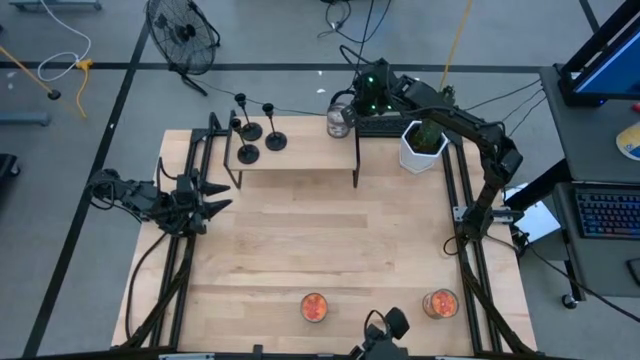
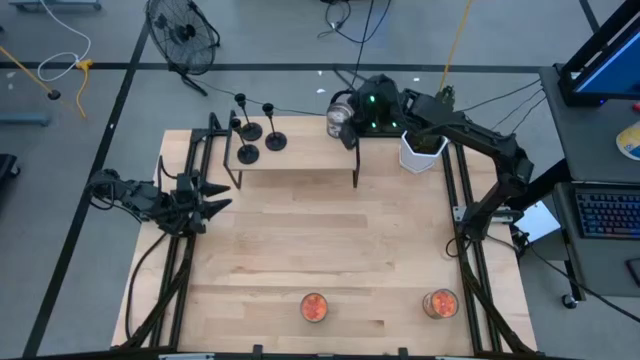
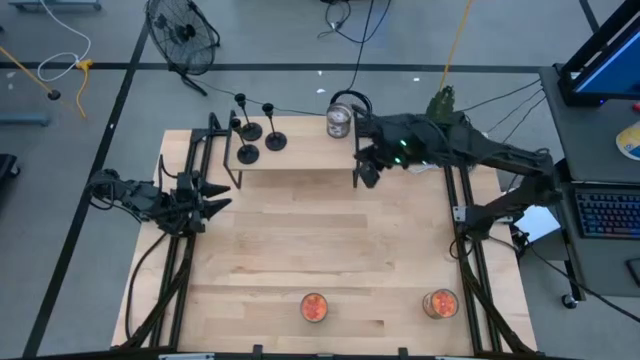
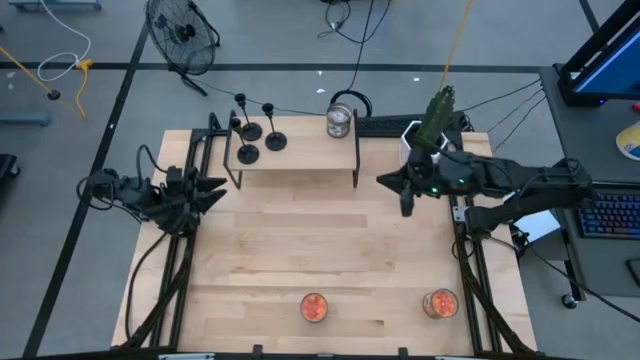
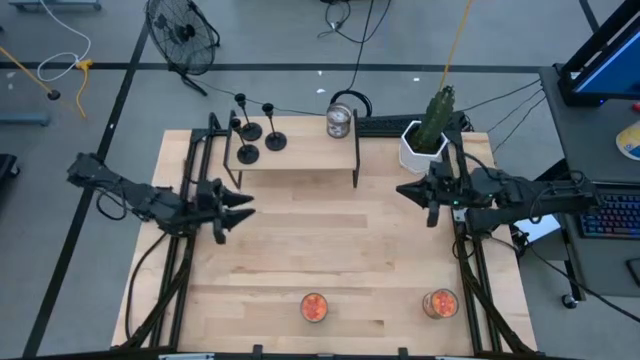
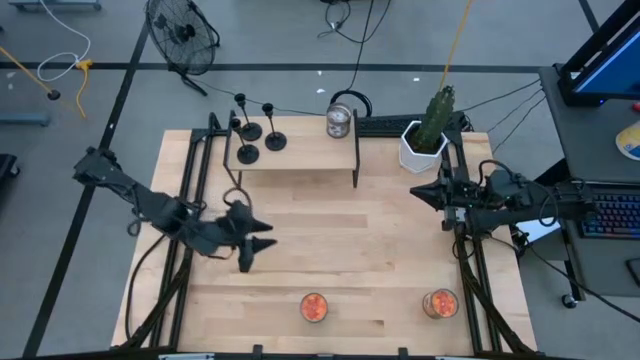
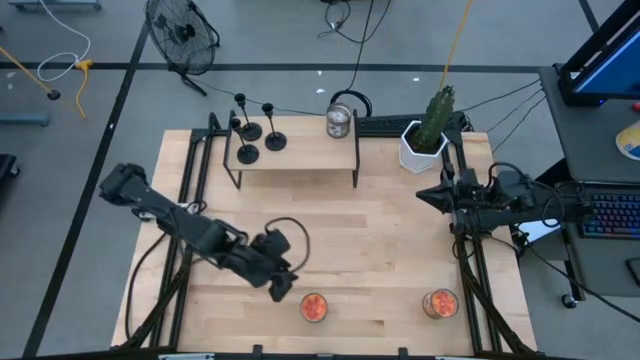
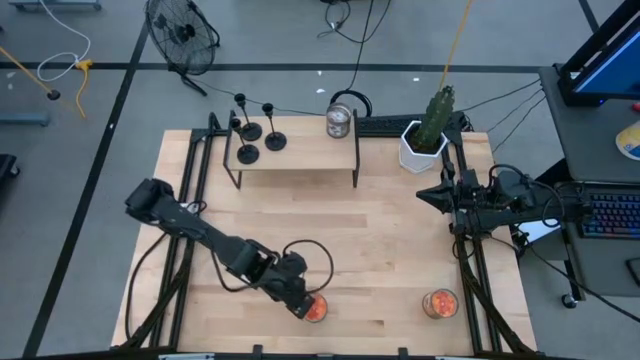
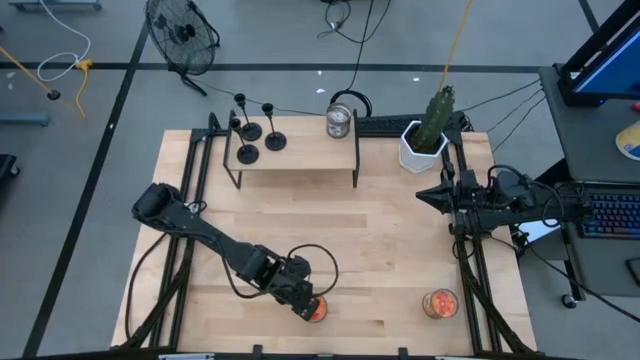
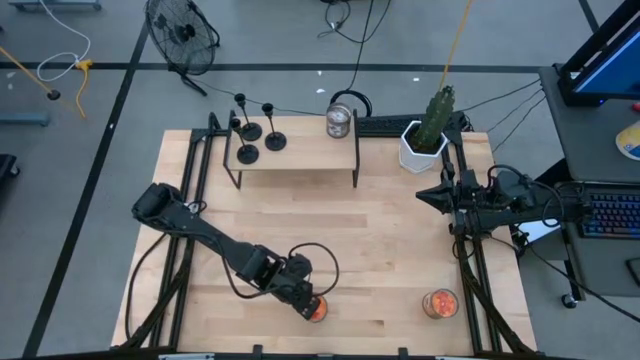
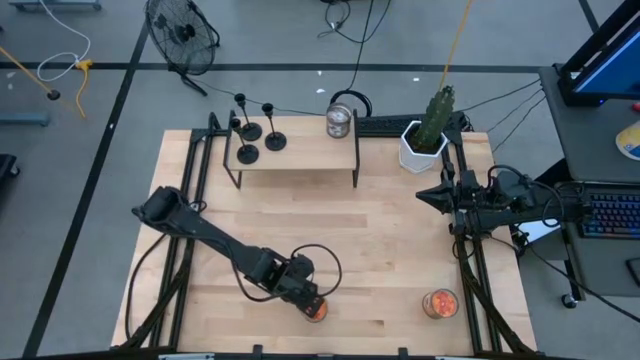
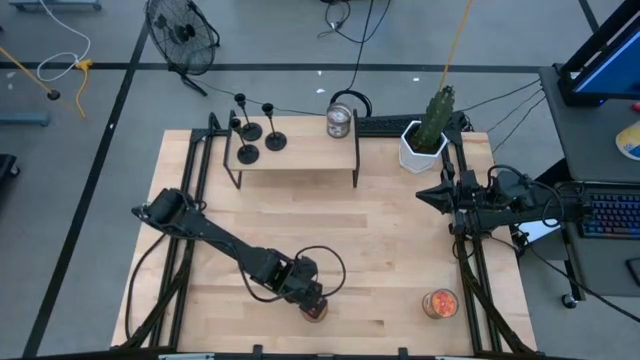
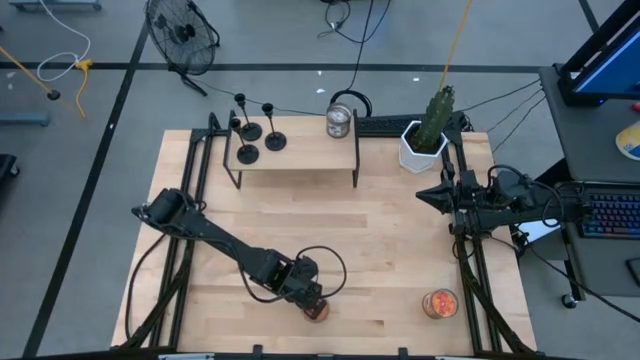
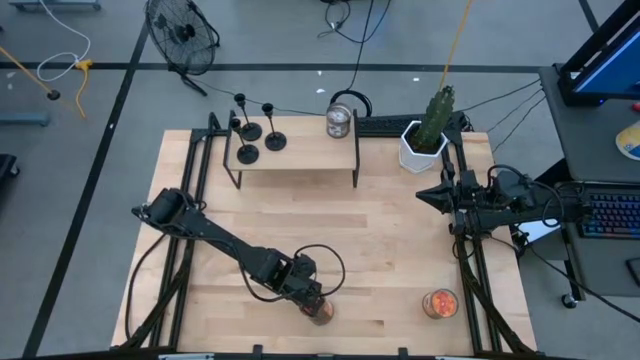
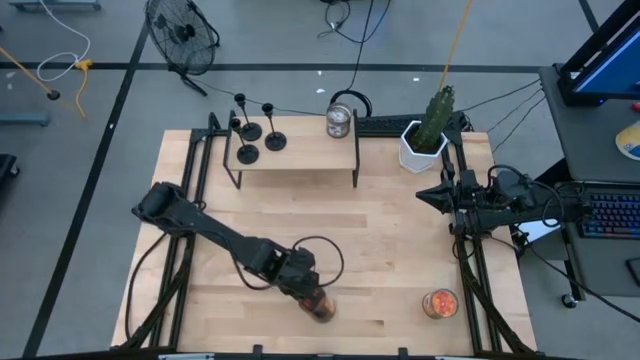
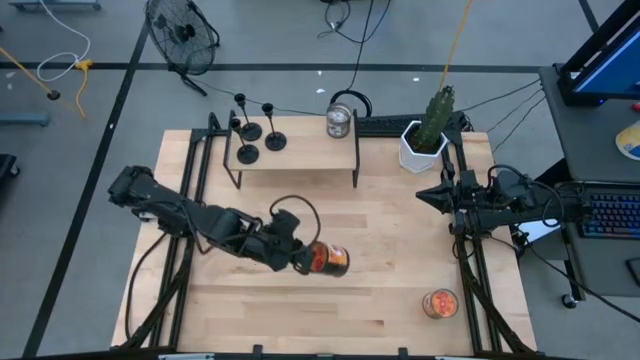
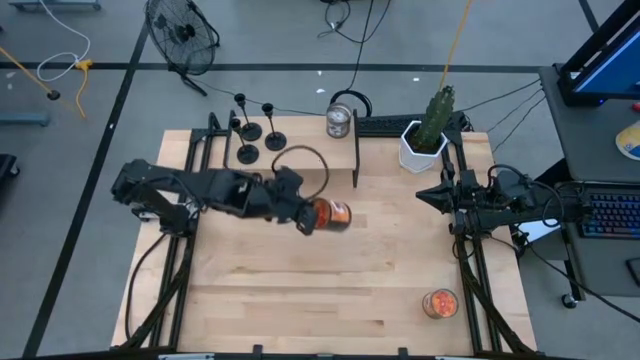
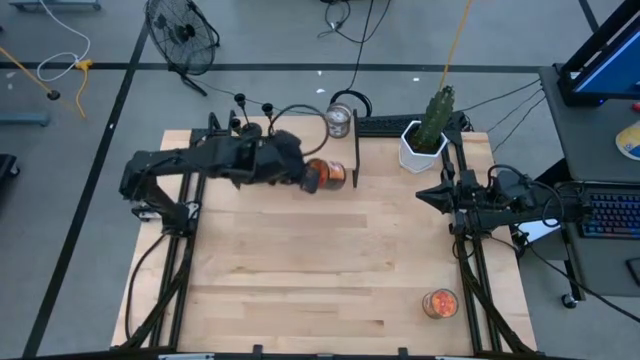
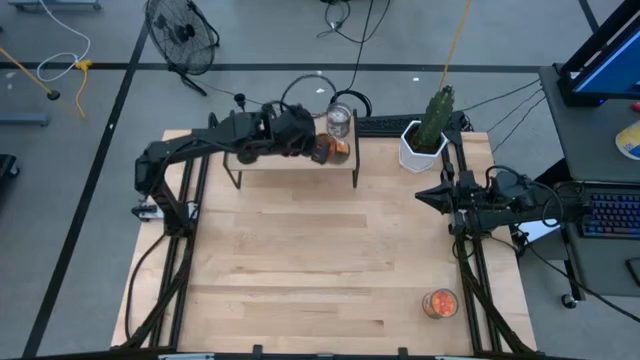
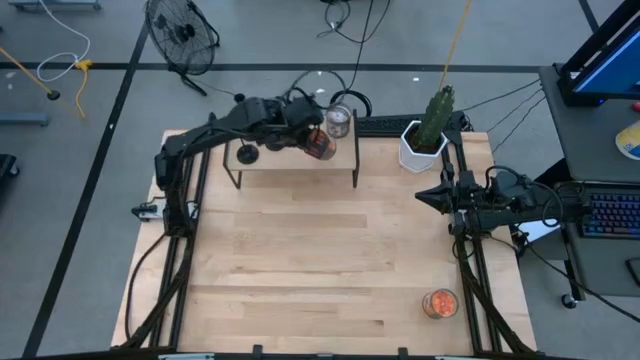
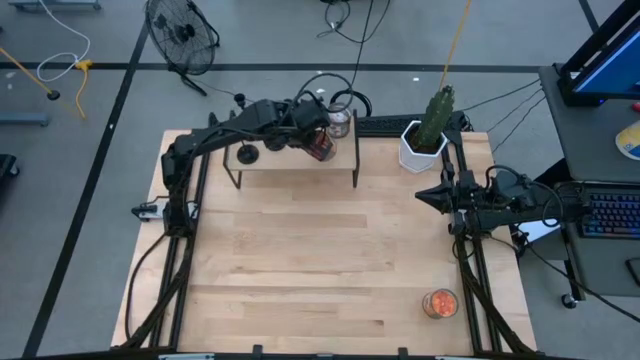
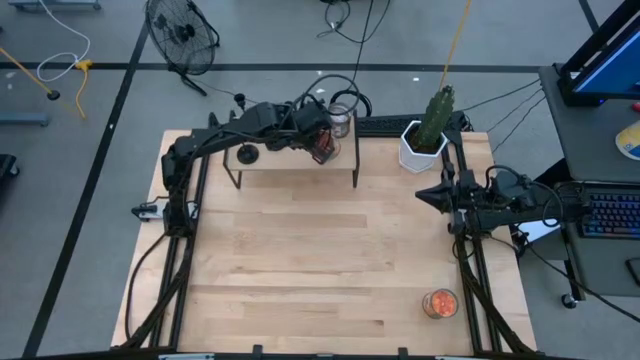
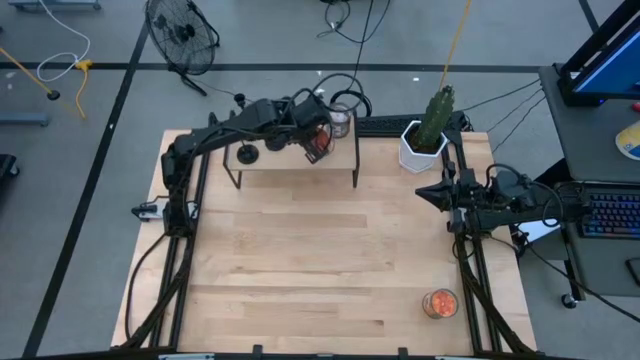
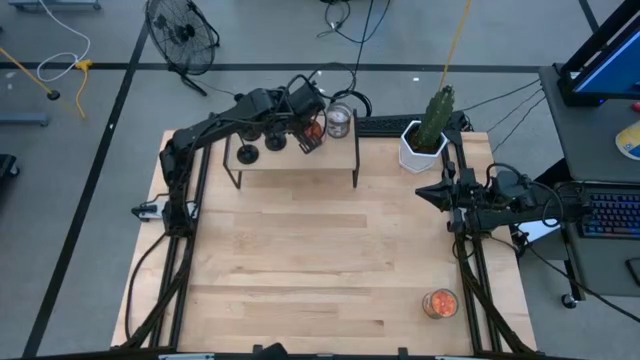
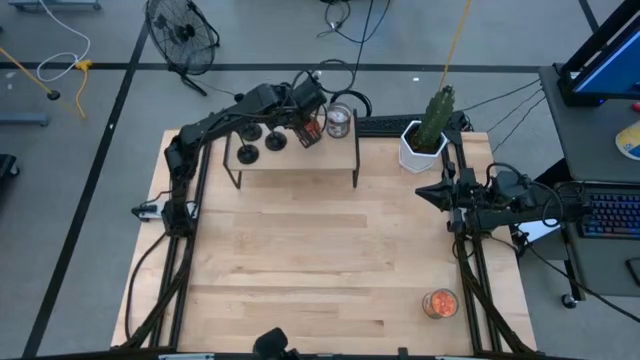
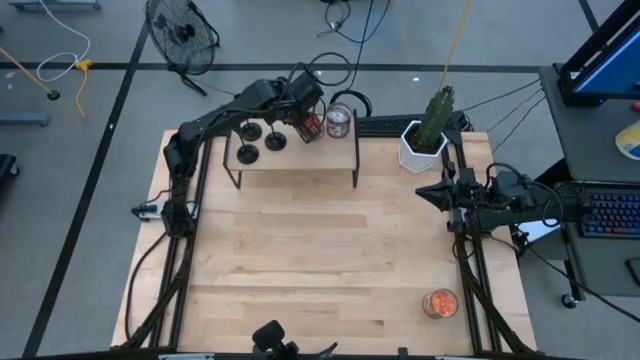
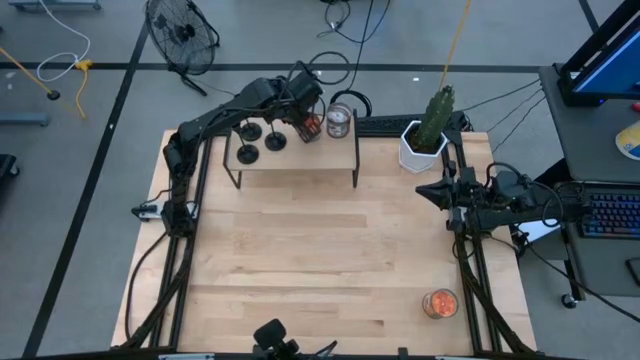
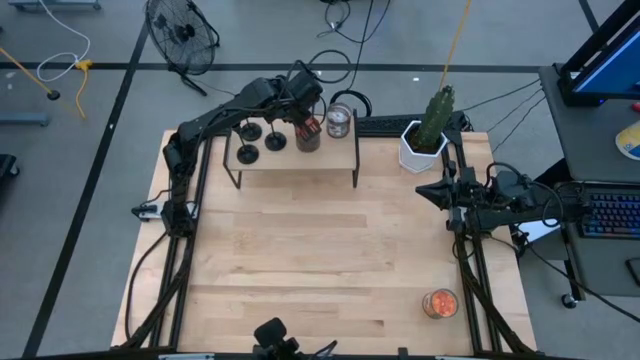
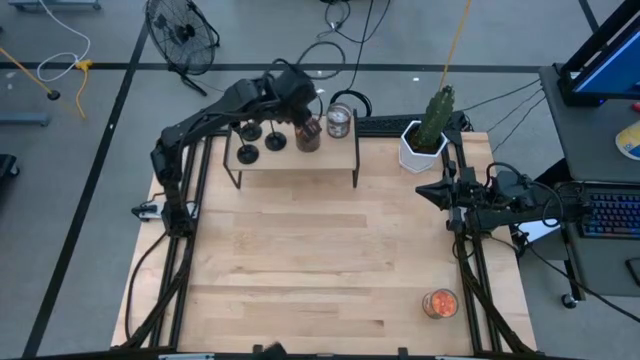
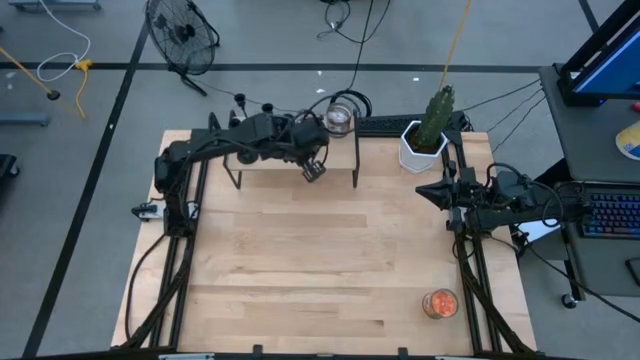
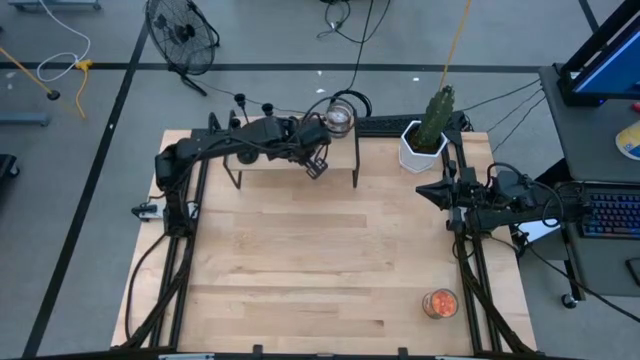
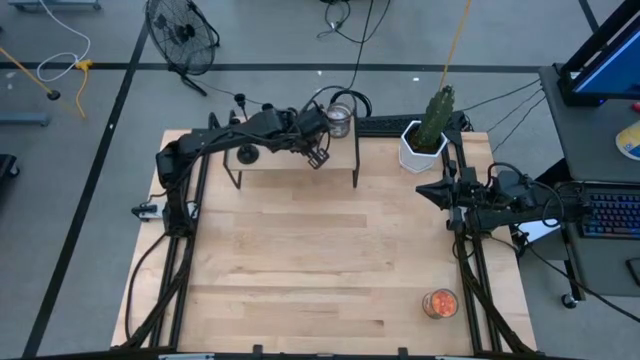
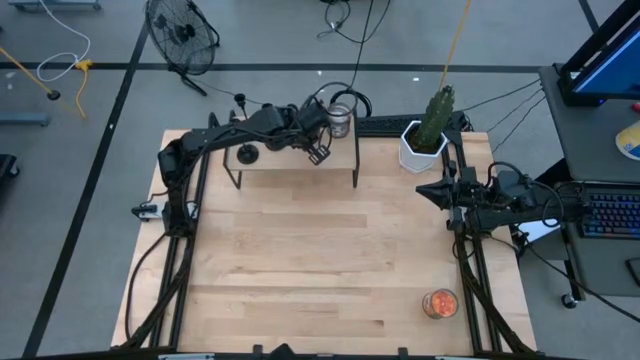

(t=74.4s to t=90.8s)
Task: Pick & Place candle stick holders
Put the left orange scented candle on the shelf

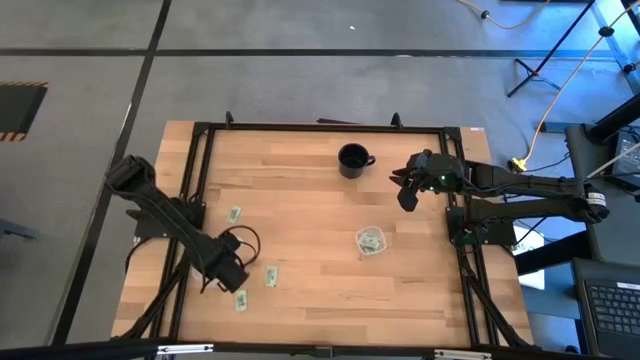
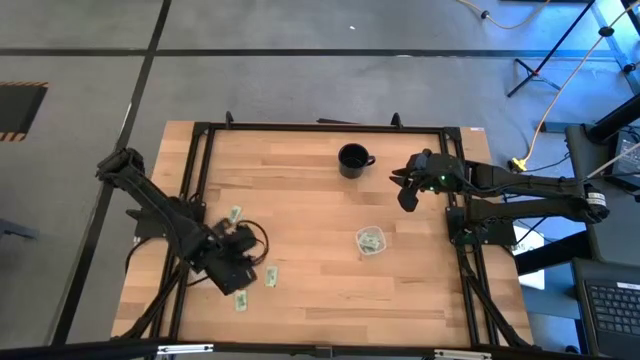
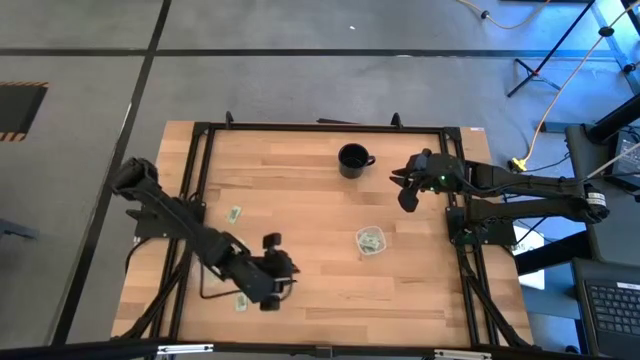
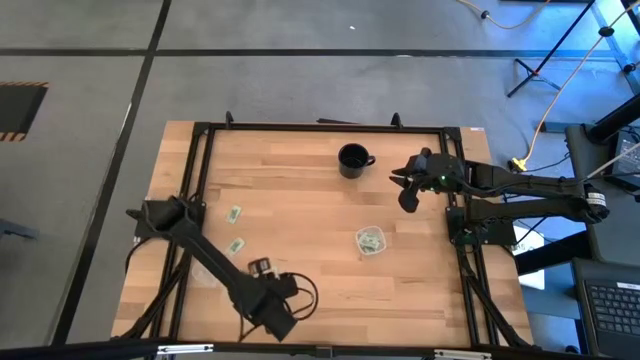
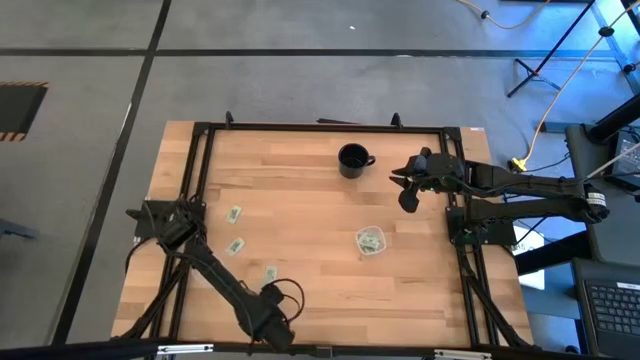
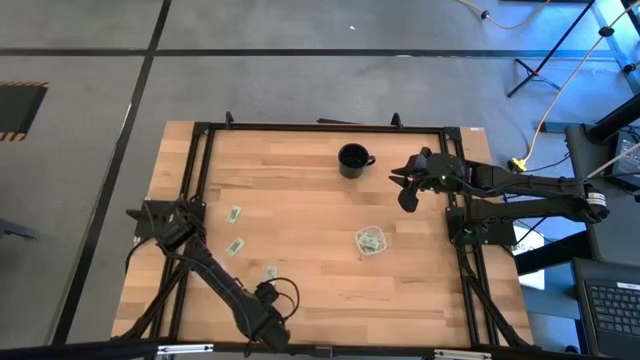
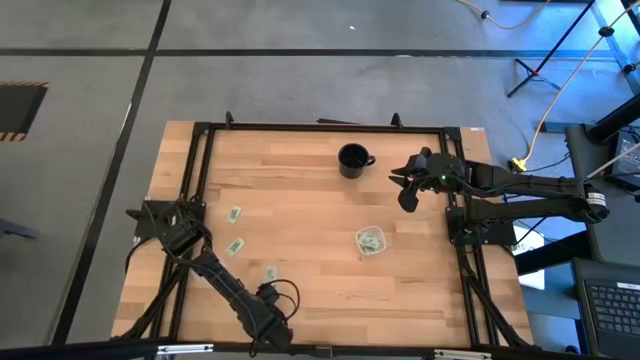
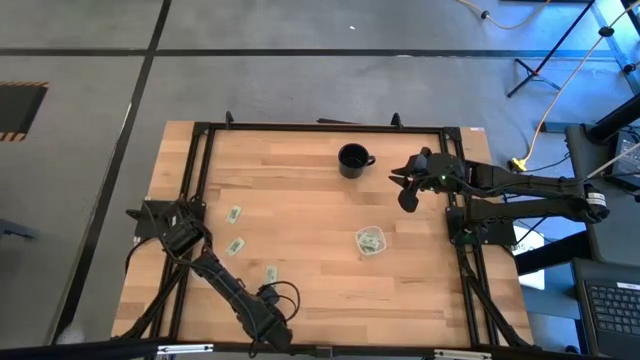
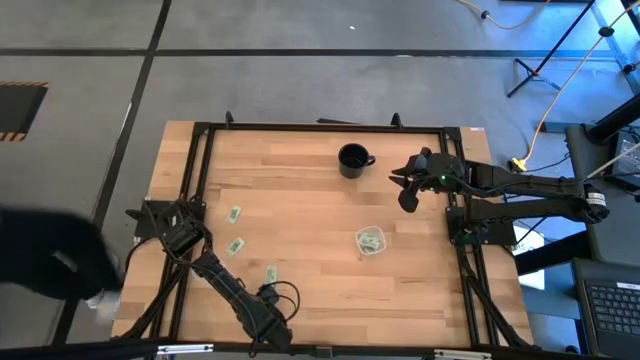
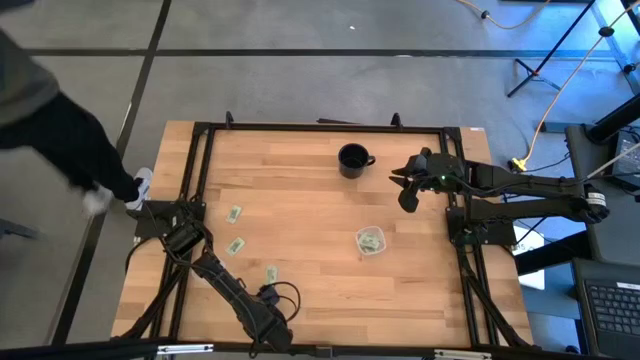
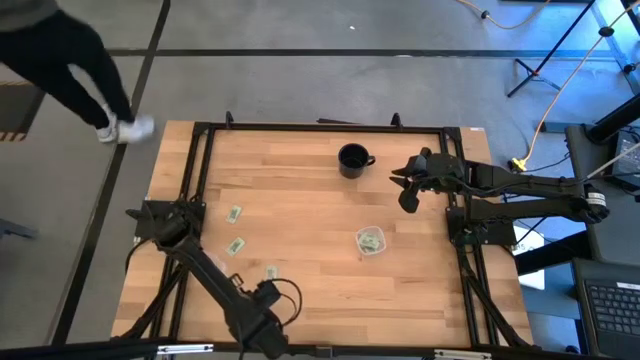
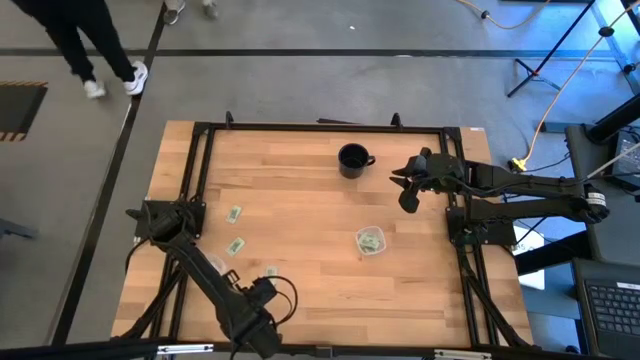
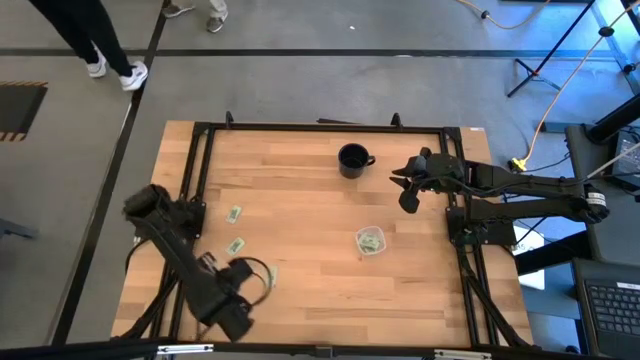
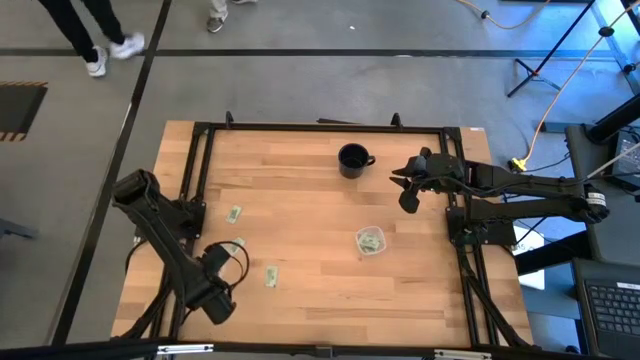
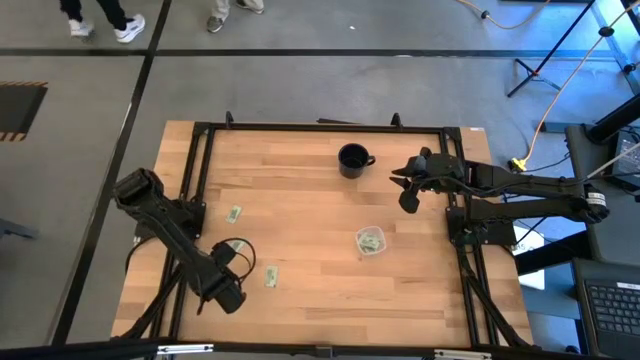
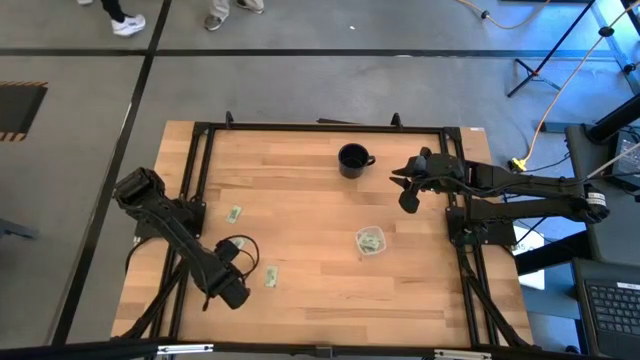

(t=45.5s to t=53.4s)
Task: Pick and place Stevia / Truvia into bins
Put the stevia packet into the left transparent container
